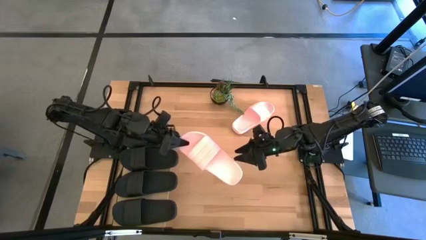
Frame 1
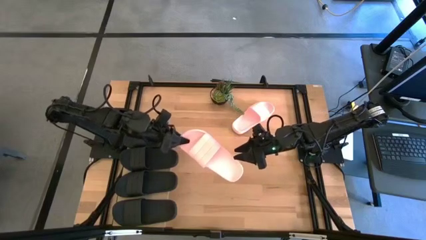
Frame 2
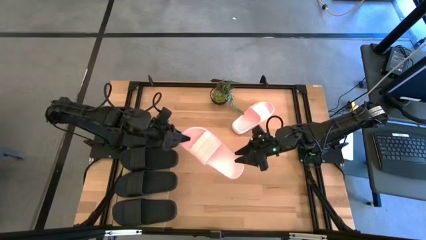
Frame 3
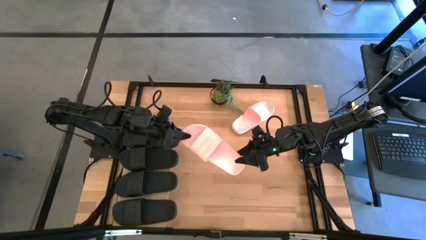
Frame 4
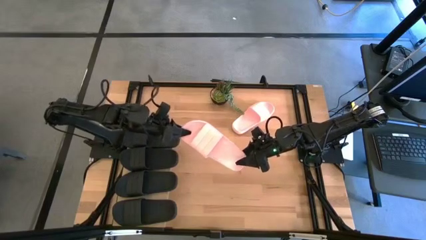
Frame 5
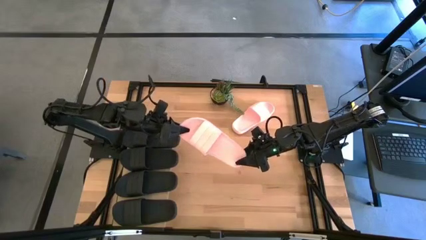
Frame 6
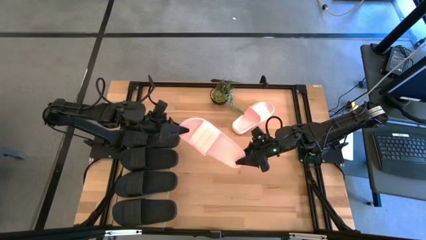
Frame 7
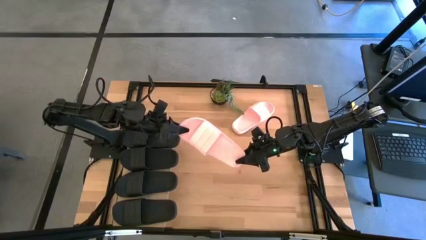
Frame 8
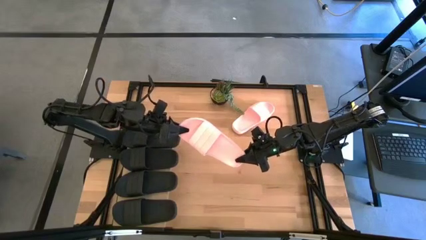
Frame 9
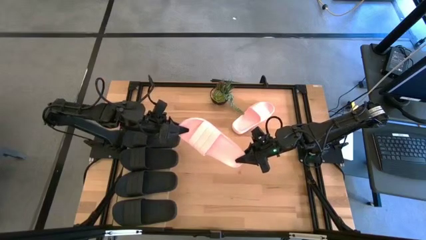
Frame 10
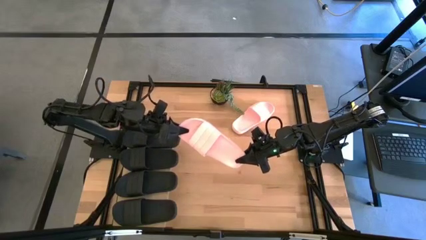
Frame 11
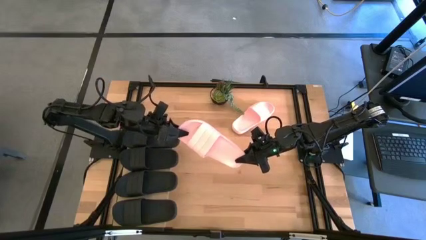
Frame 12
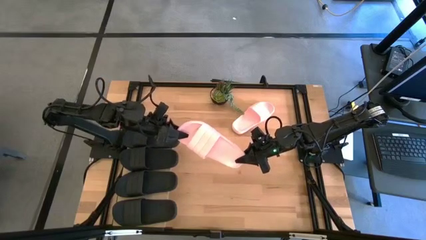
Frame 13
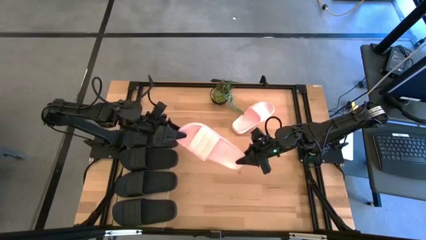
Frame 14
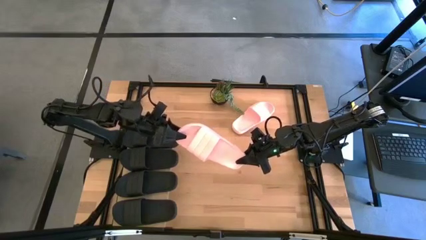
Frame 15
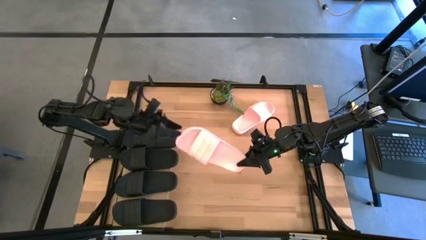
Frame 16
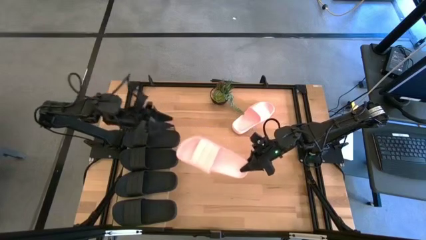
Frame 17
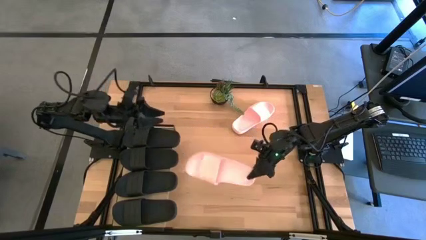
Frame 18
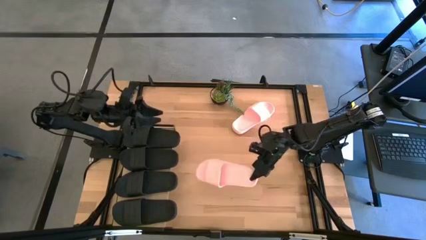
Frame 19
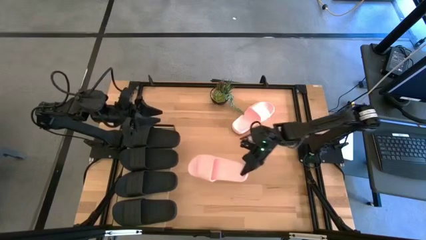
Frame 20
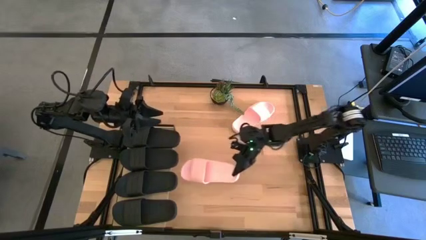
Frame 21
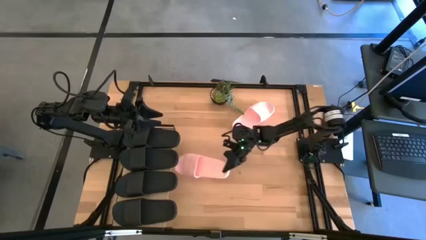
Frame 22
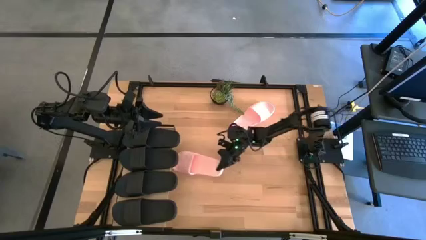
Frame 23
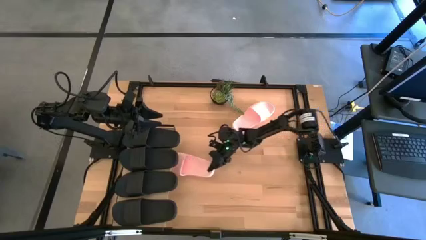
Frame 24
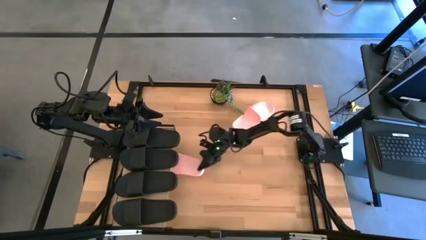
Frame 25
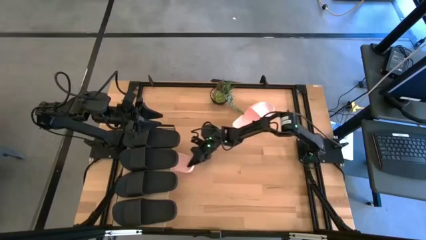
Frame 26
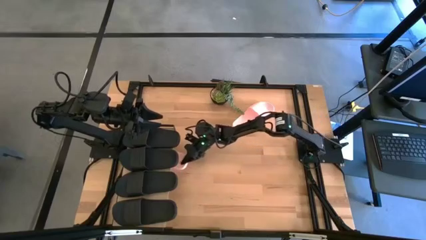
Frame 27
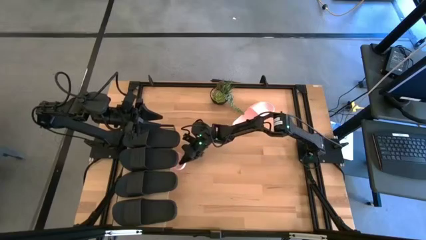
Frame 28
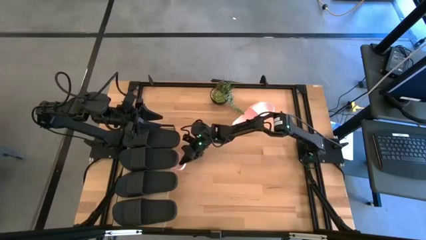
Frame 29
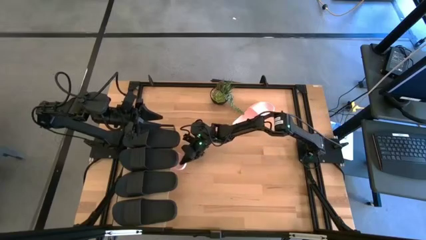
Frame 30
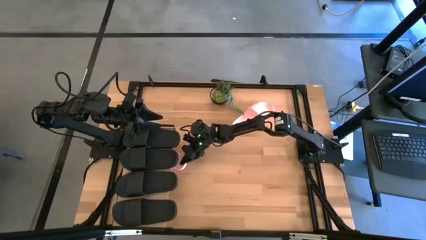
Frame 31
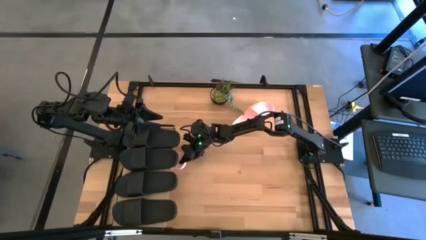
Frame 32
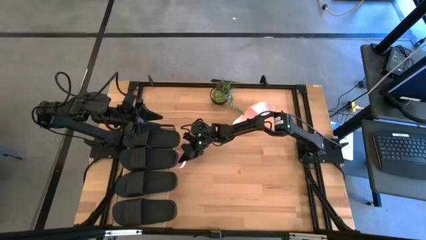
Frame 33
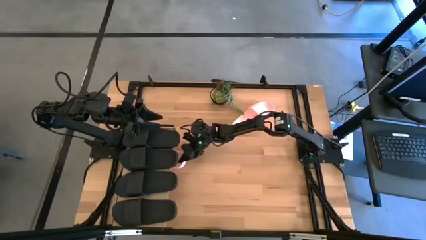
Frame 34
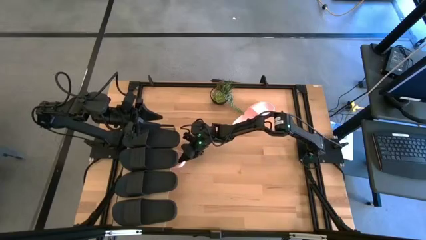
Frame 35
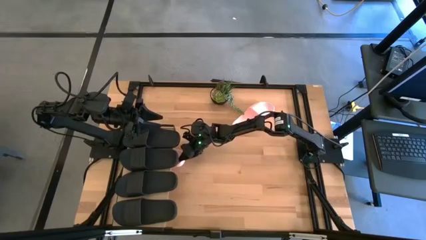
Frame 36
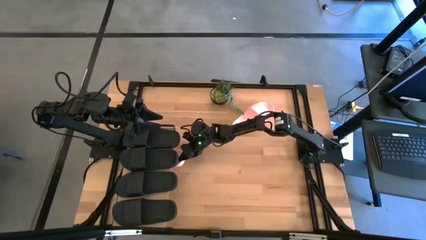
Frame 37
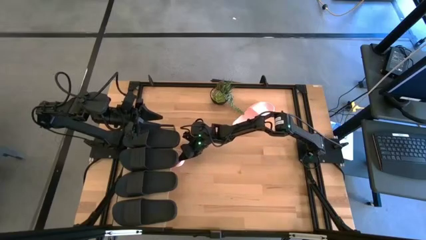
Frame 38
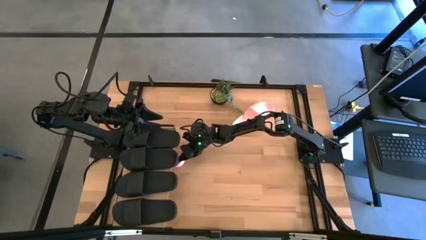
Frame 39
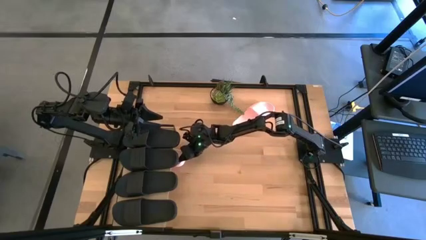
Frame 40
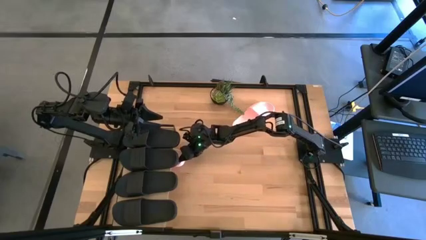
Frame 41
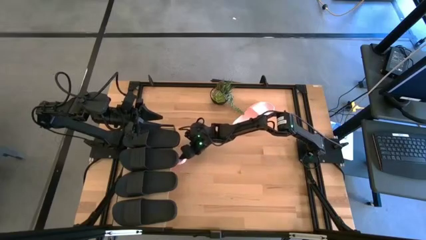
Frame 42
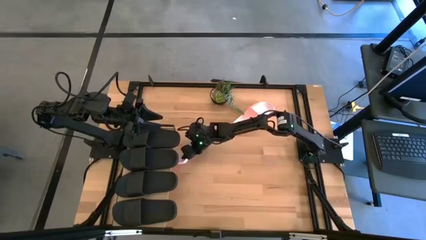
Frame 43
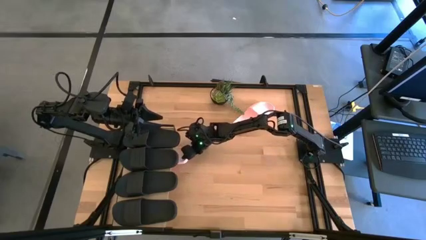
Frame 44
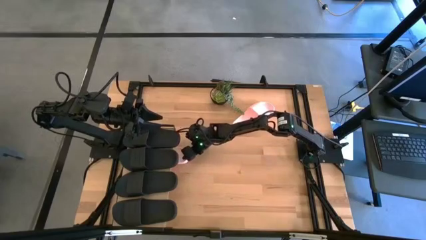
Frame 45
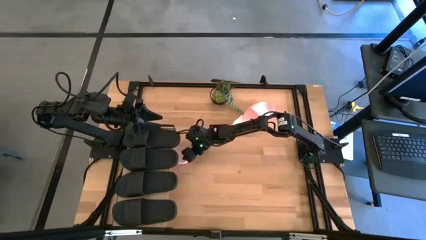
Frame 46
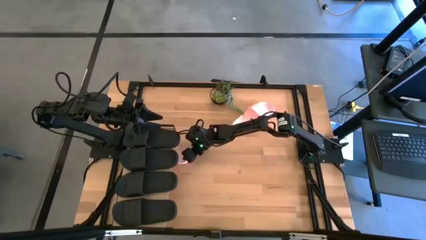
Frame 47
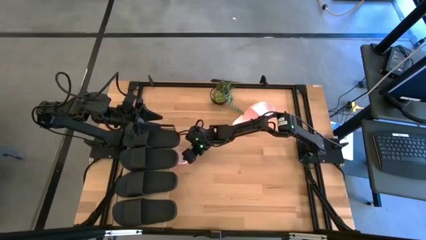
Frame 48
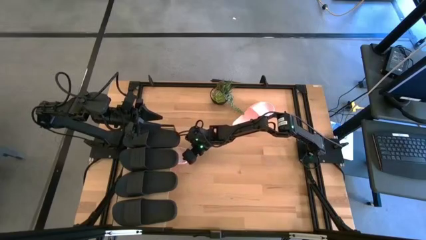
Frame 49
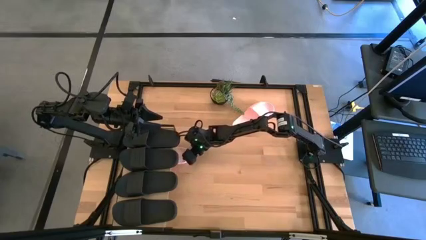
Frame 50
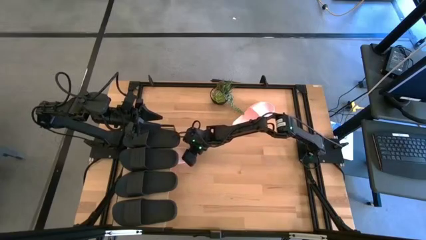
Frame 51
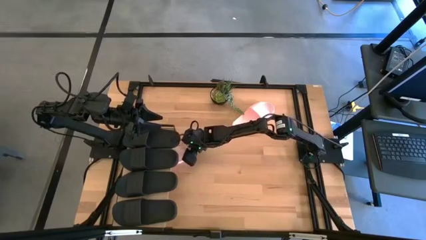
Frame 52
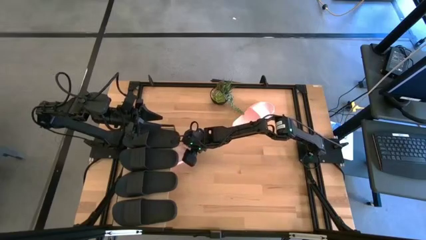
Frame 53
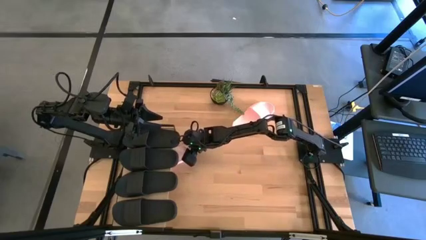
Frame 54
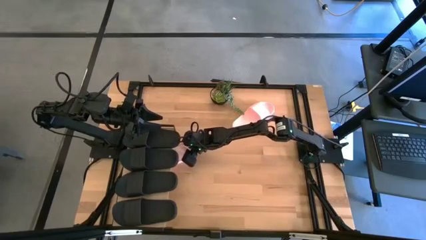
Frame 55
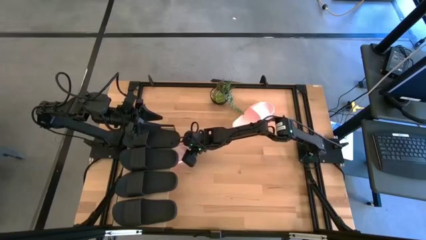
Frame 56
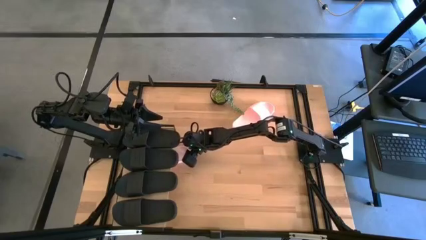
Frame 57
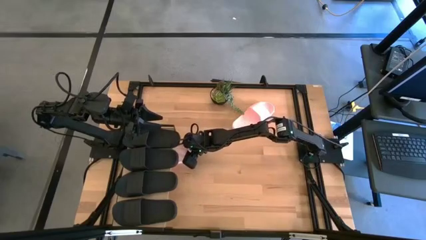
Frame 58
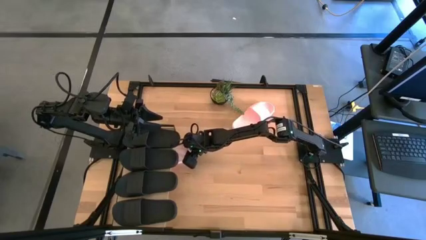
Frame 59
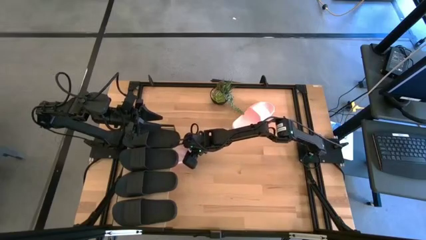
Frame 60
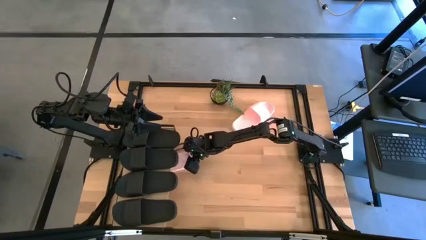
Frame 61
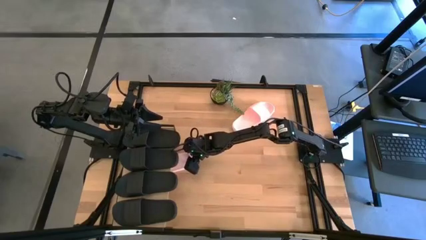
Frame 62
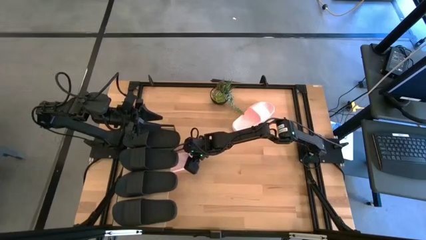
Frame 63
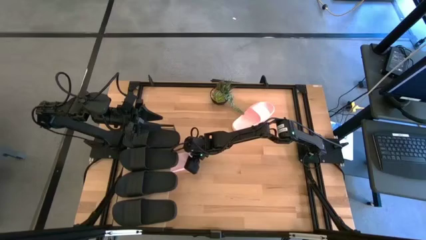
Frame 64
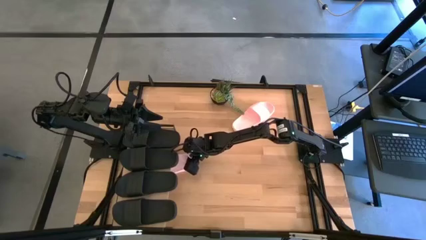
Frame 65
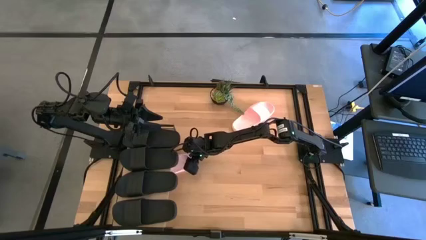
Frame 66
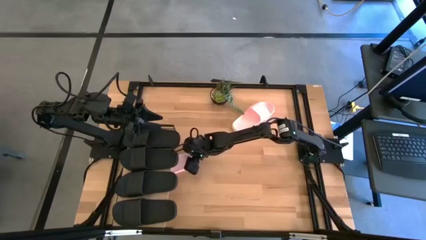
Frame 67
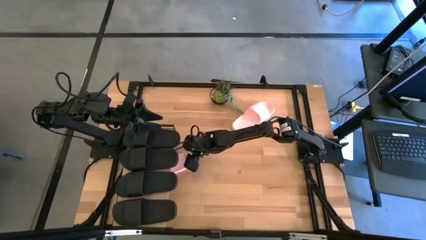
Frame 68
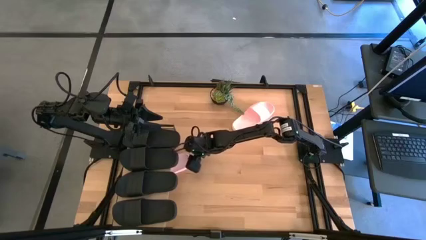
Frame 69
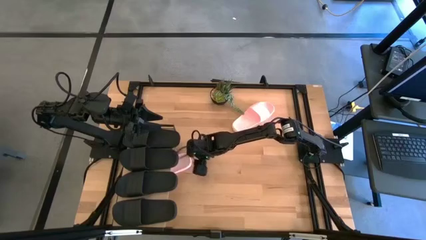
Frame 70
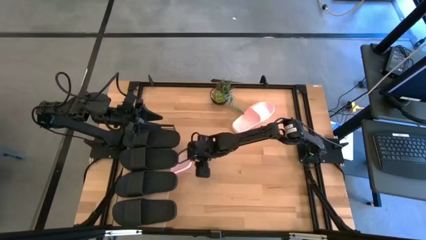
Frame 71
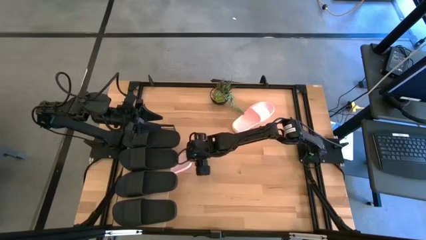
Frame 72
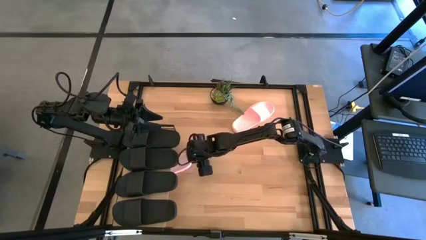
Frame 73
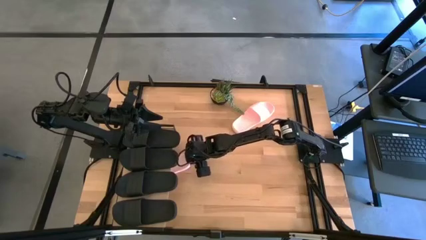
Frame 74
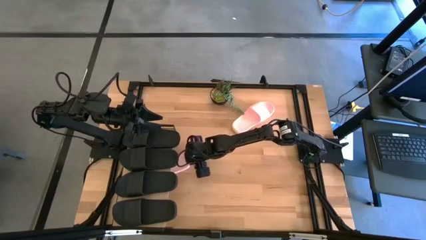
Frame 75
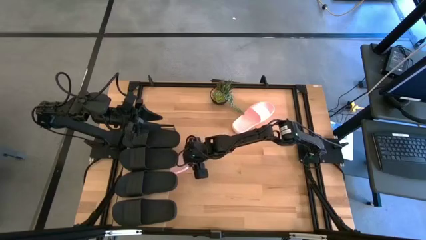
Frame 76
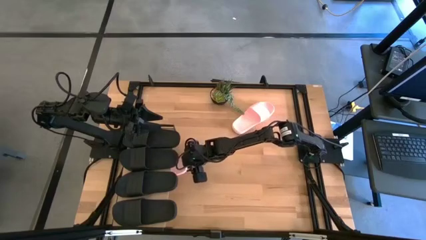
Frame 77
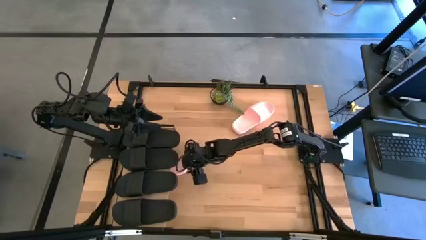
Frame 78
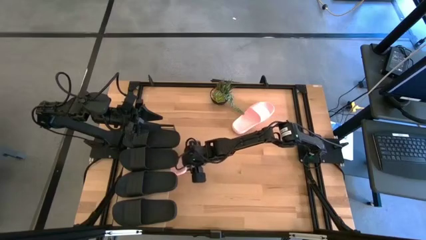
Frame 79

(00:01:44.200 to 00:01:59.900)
Task: Pick and place slides into the shelf
Put the bottom pink slipper under the shelf
